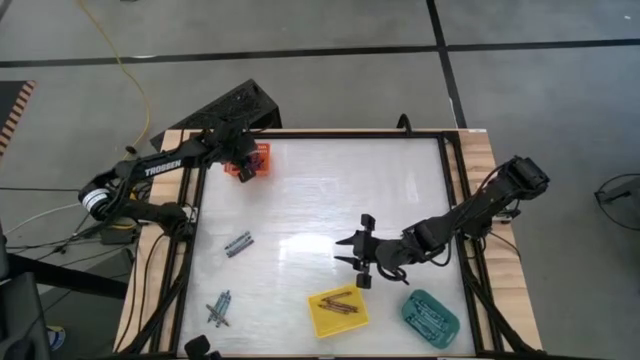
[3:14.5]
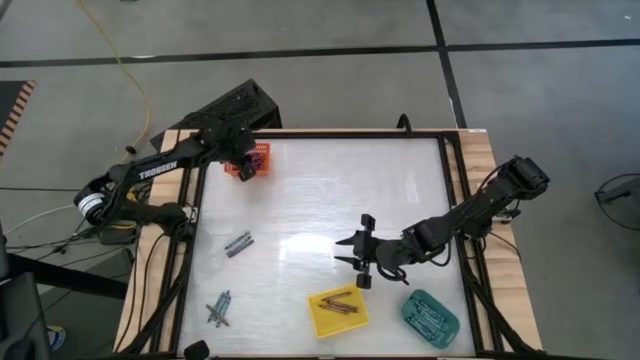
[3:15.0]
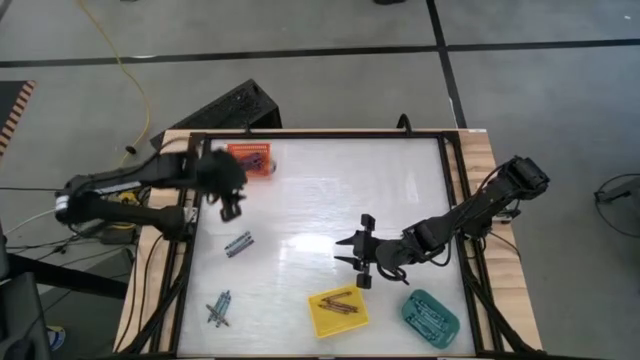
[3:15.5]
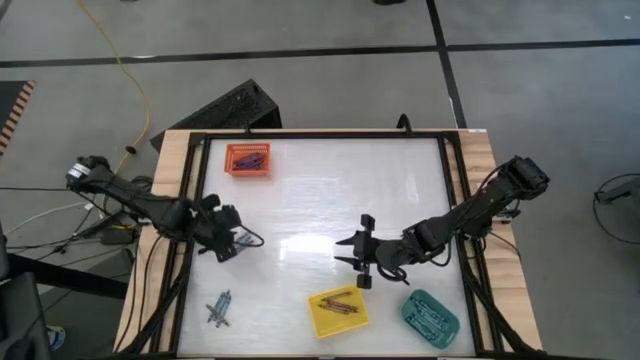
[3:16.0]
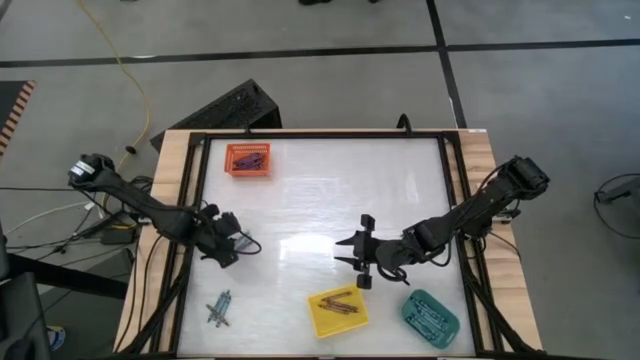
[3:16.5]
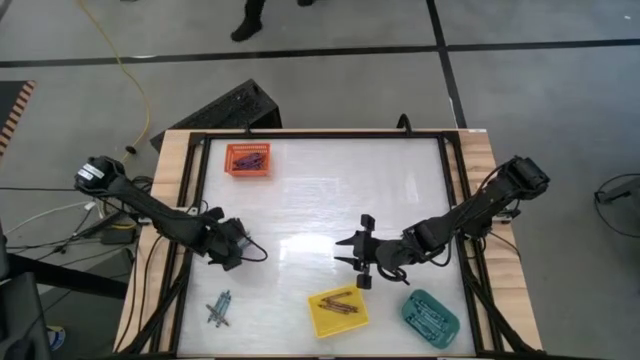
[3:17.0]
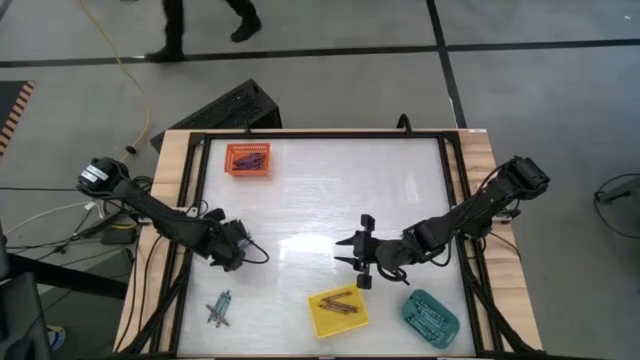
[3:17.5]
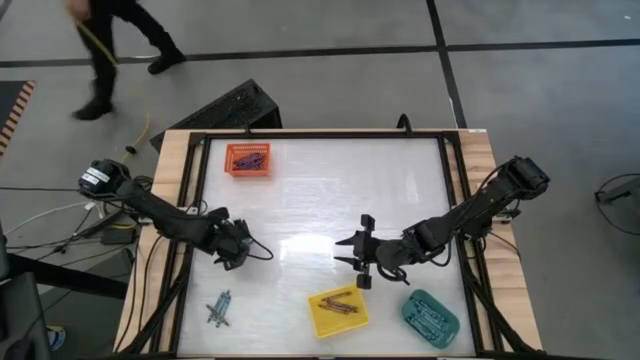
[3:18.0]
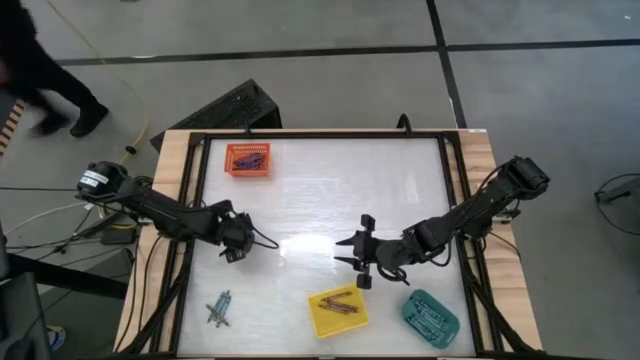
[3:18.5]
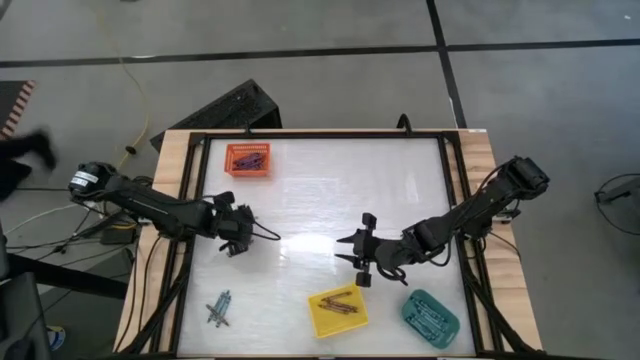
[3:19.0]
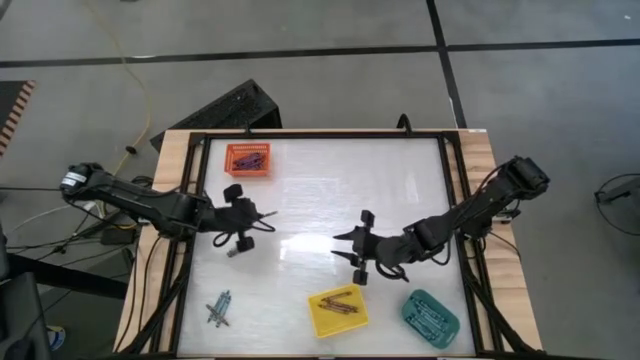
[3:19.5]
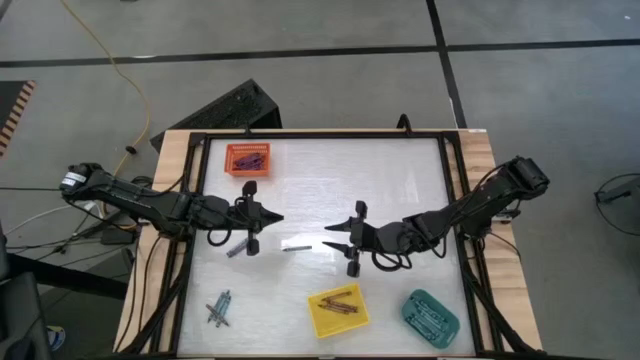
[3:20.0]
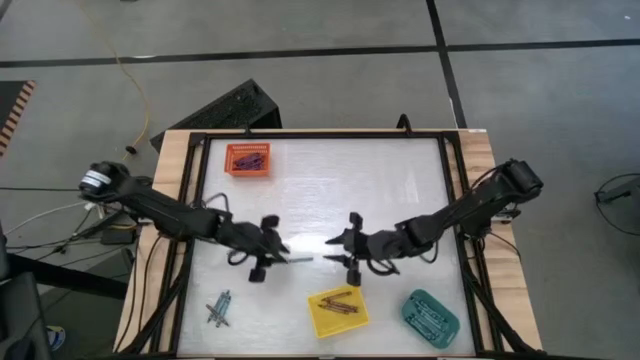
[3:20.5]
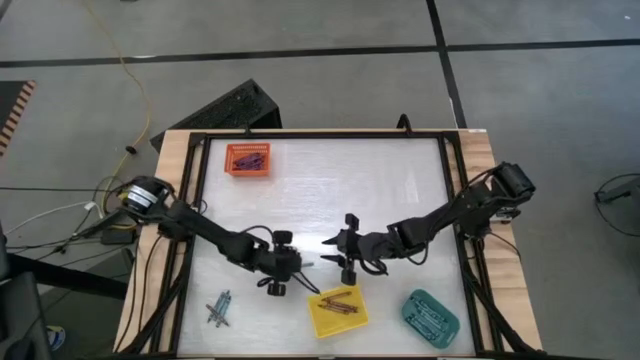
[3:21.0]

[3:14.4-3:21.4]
Task: Sort crayons
Put the blue crayon into the green bin

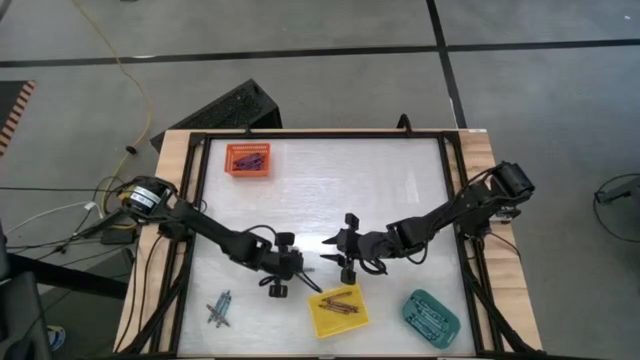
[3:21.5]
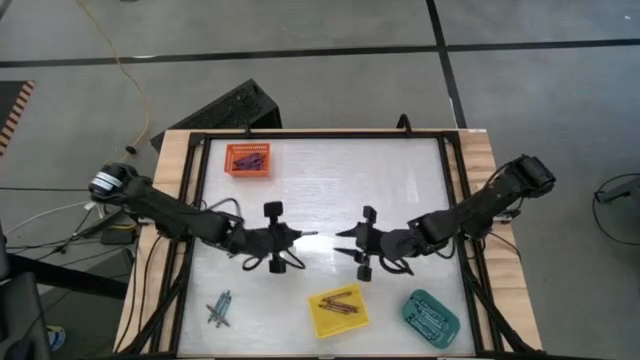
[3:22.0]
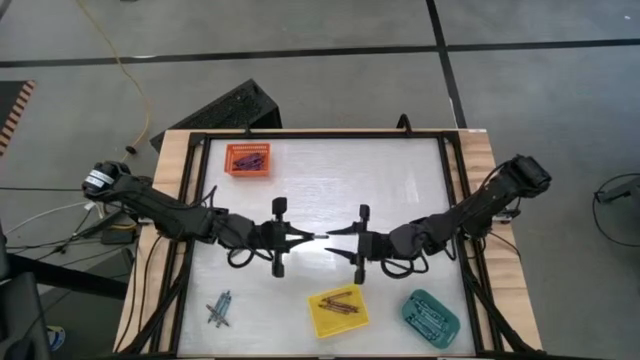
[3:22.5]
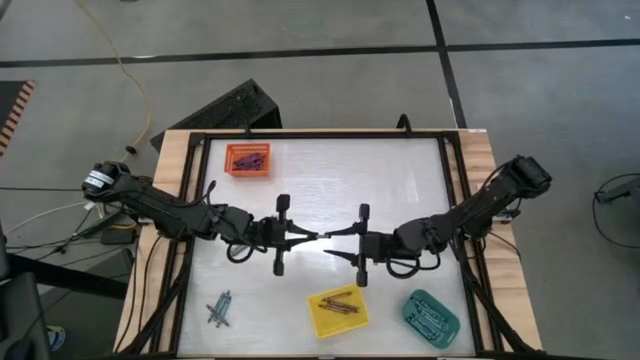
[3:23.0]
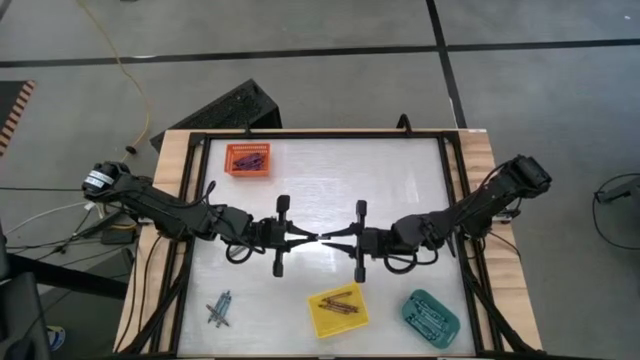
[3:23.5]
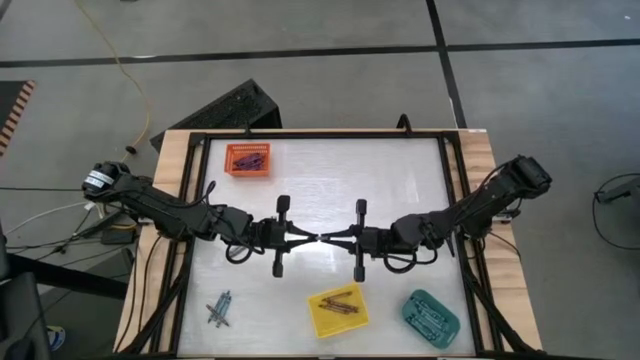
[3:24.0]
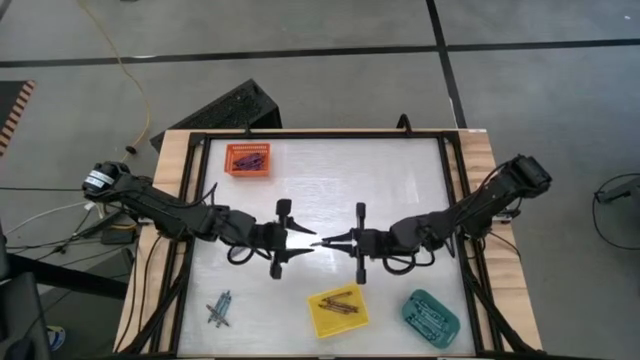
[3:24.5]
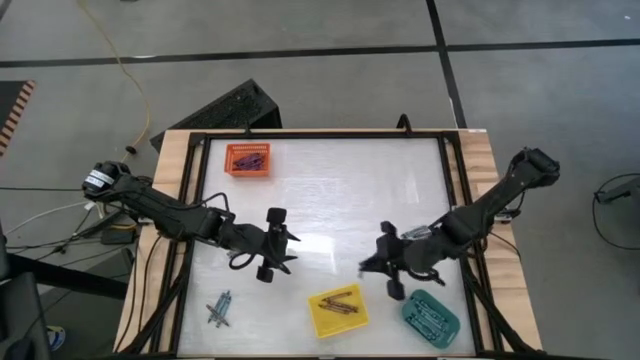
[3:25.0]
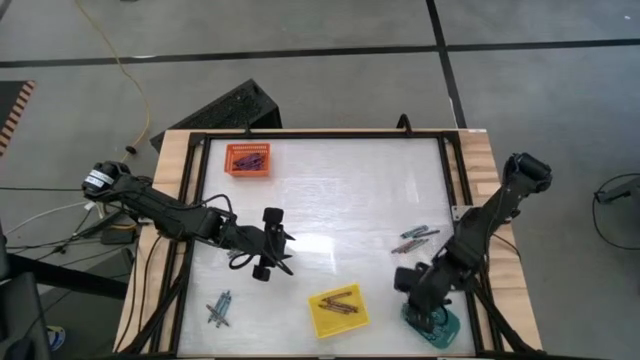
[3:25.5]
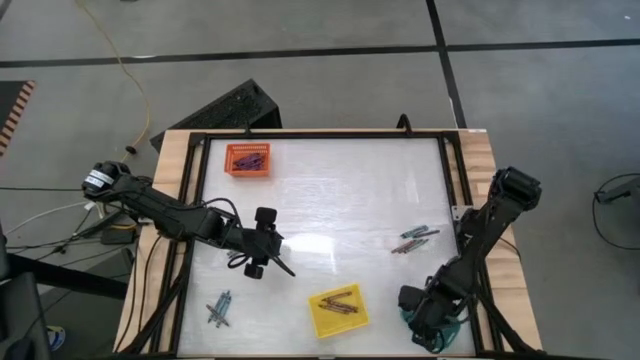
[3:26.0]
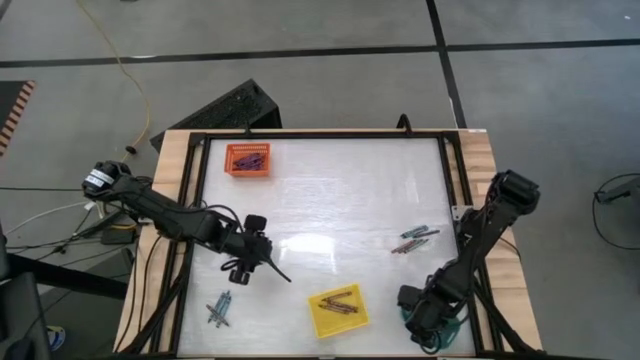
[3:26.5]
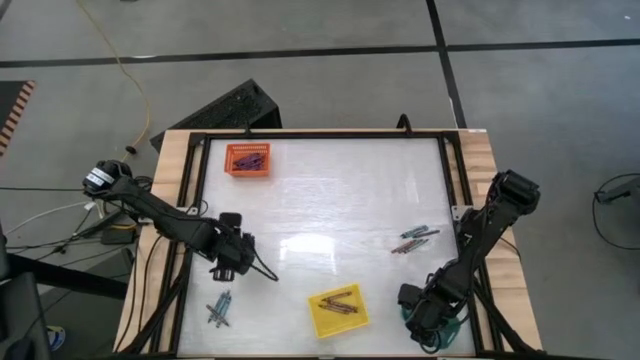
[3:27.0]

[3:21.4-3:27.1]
Put the blue crayon into the green bin

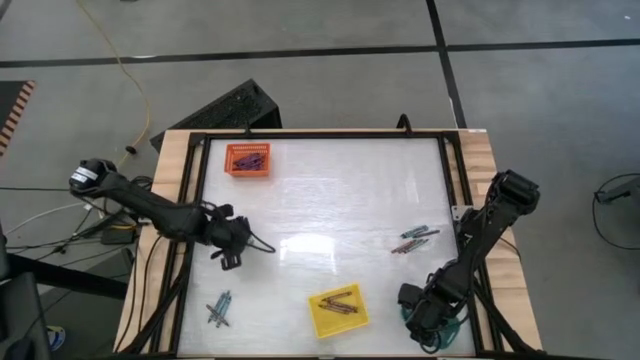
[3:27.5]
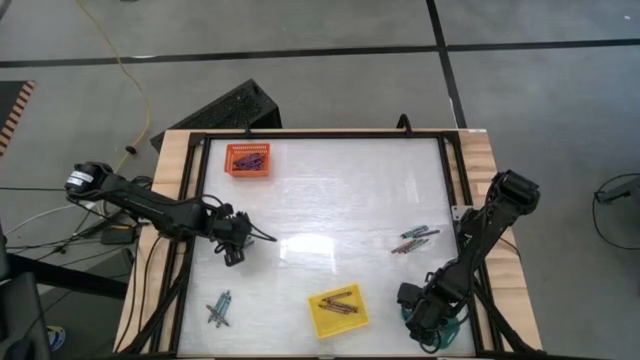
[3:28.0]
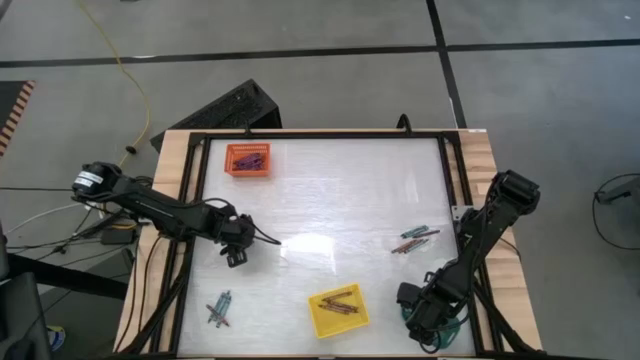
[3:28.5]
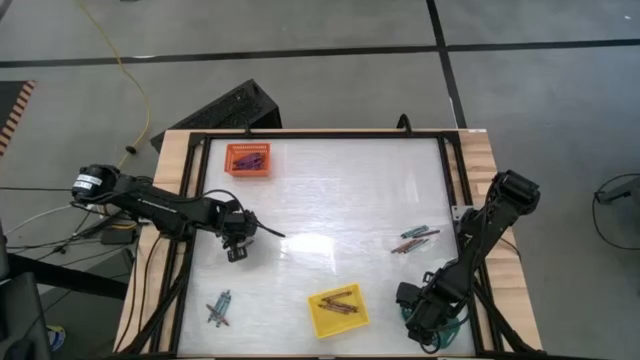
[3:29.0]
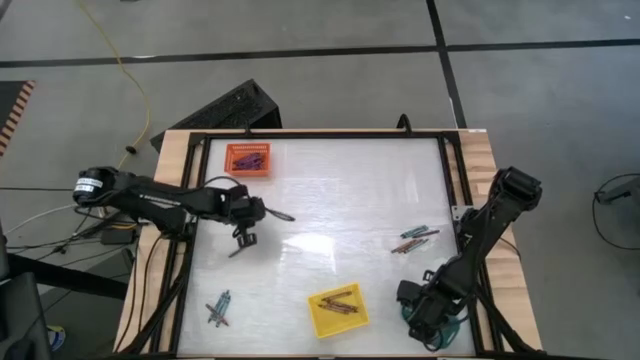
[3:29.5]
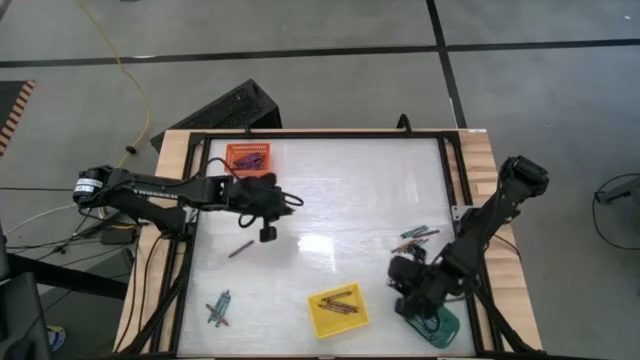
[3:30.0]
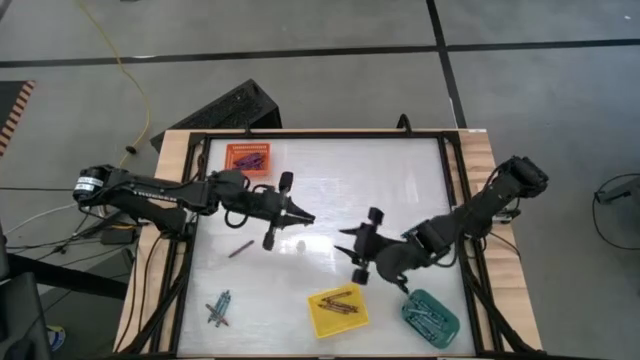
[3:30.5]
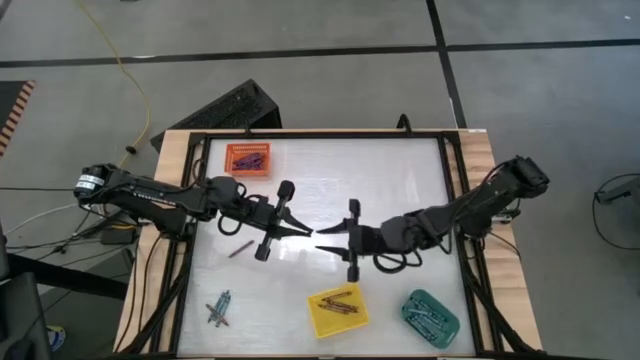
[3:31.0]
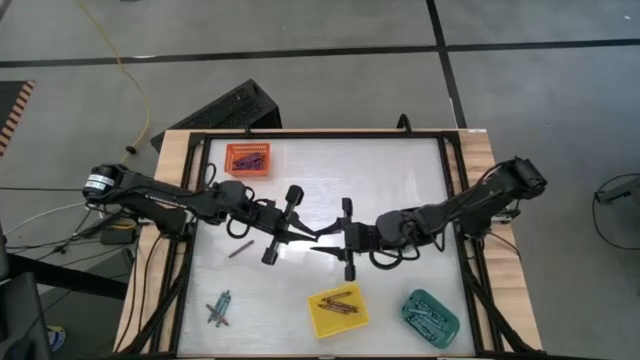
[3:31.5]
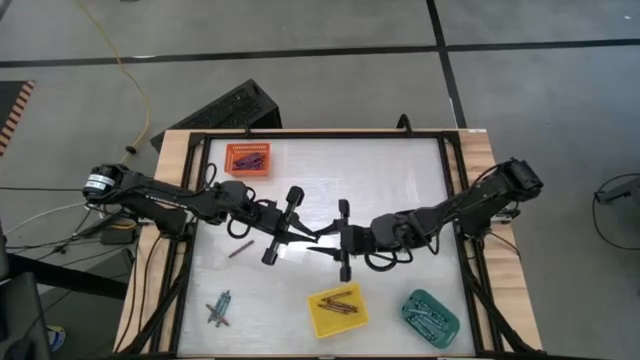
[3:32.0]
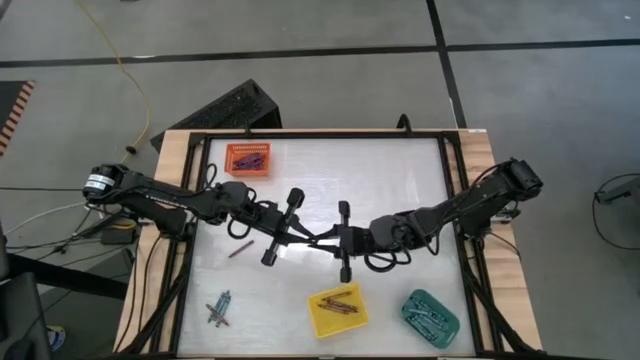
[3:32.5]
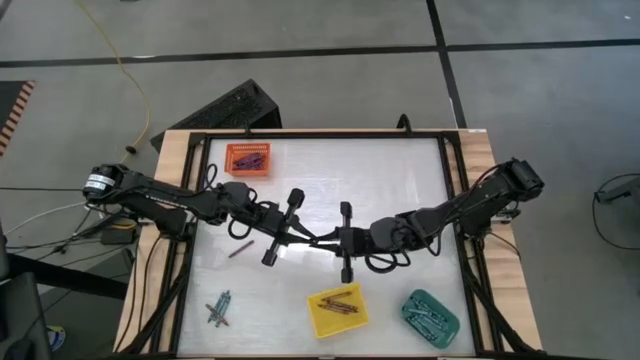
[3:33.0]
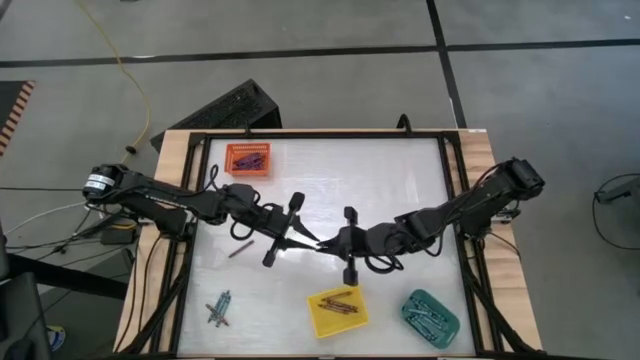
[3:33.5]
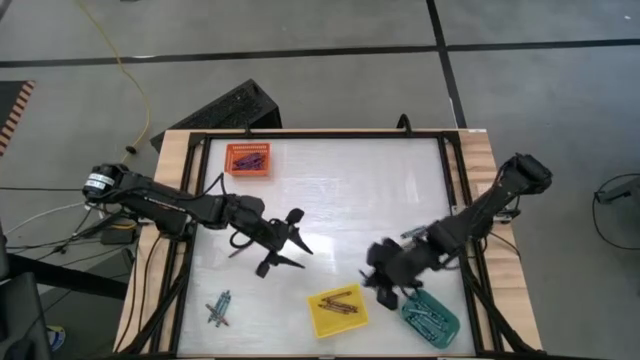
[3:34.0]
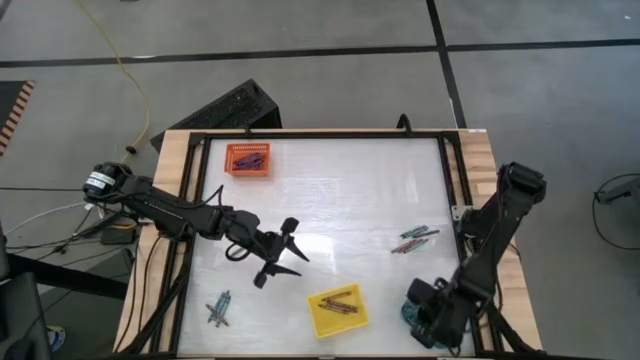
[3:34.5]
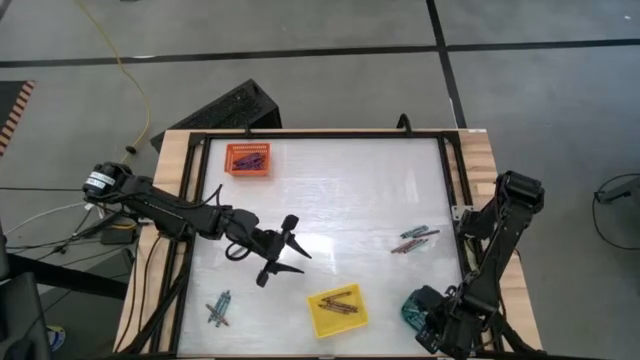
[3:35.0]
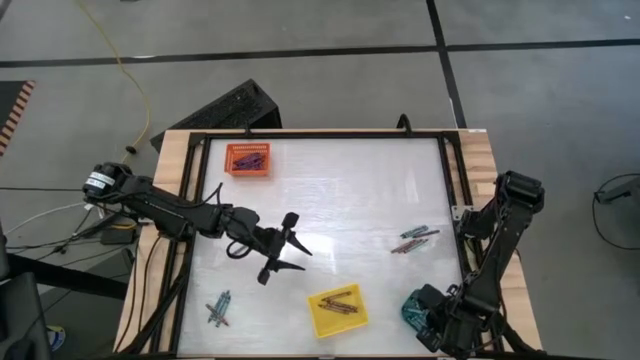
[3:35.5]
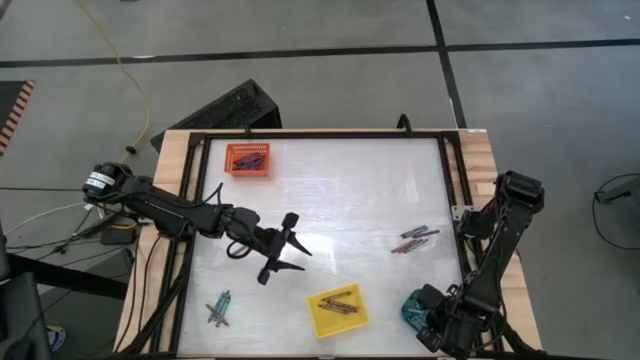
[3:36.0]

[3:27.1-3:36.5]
Put the blue crayon into the green bin
